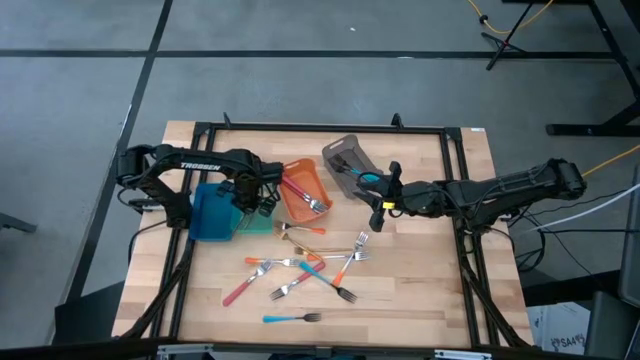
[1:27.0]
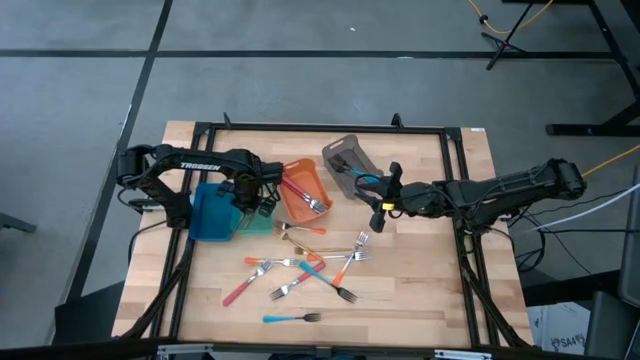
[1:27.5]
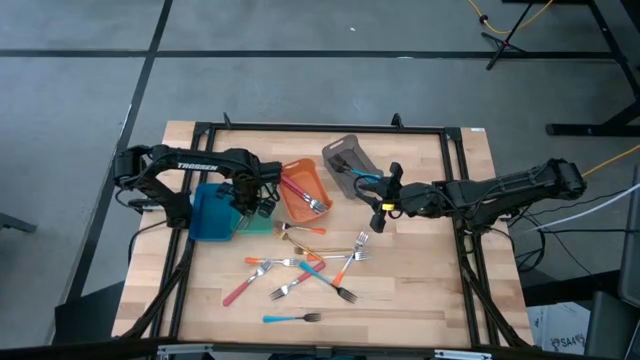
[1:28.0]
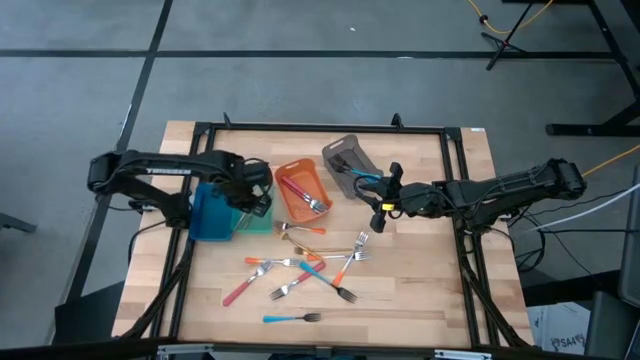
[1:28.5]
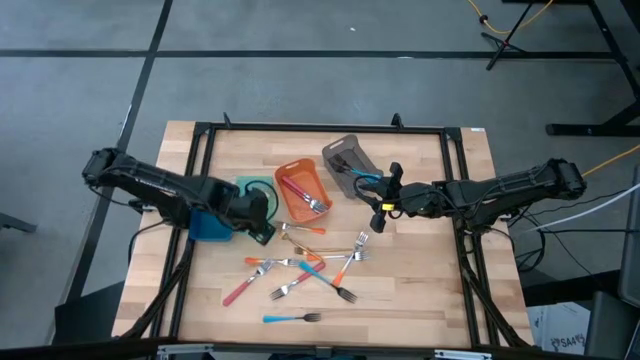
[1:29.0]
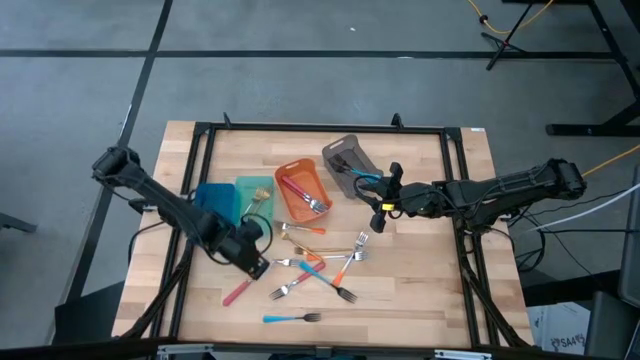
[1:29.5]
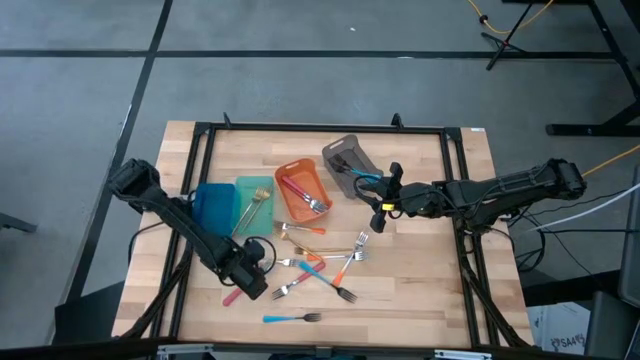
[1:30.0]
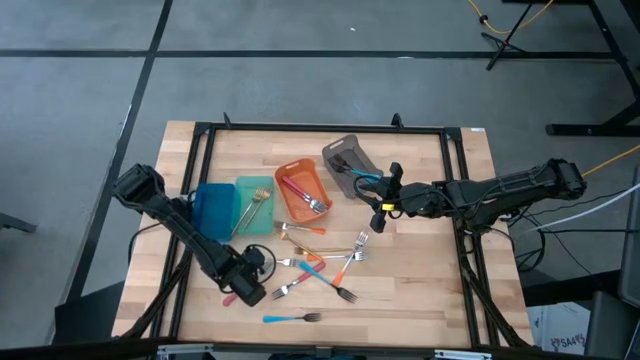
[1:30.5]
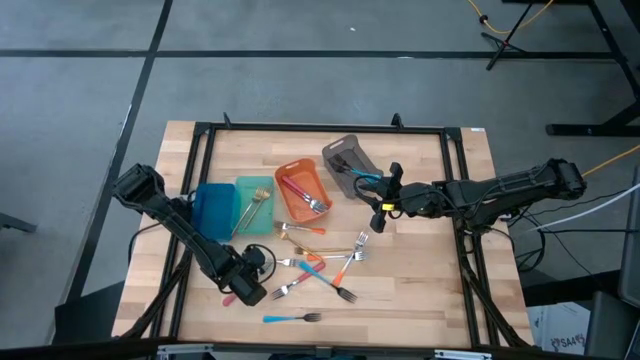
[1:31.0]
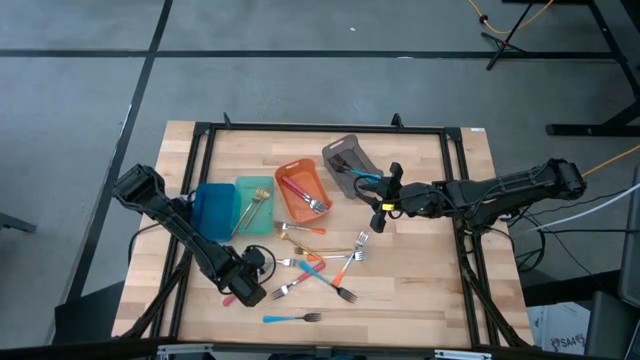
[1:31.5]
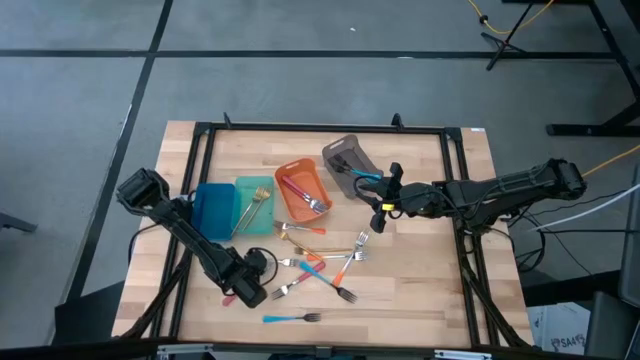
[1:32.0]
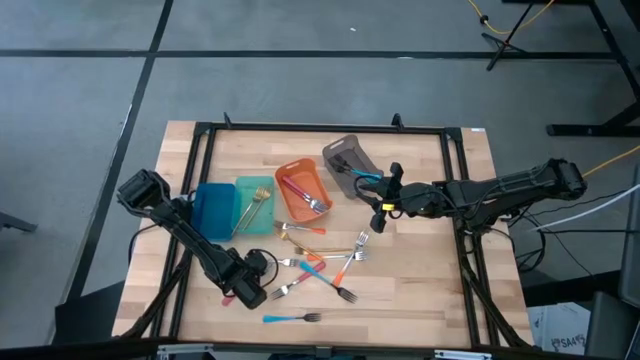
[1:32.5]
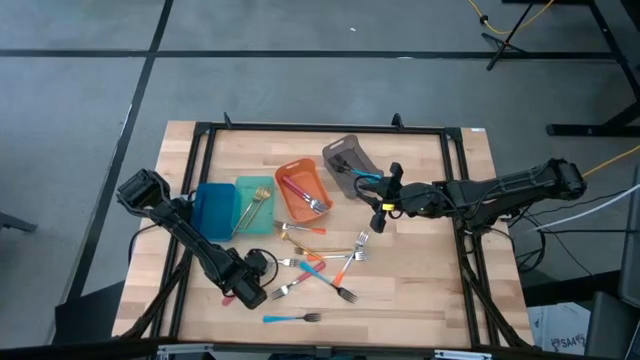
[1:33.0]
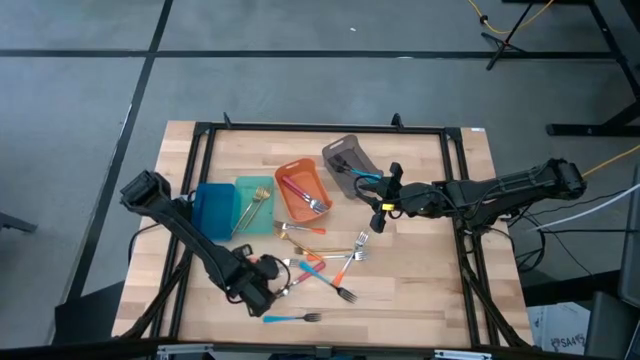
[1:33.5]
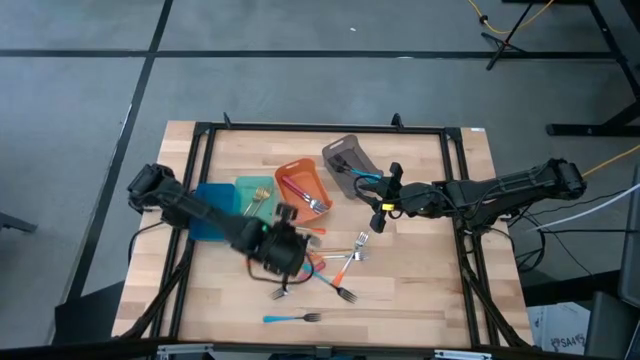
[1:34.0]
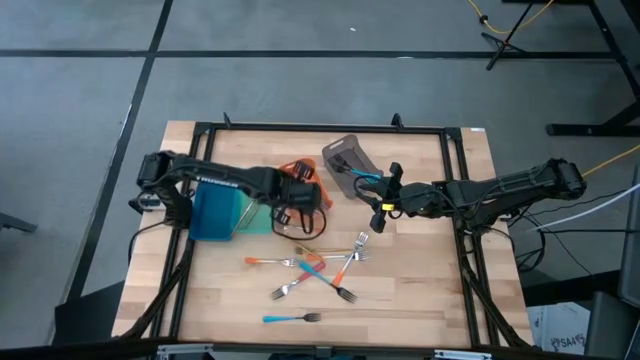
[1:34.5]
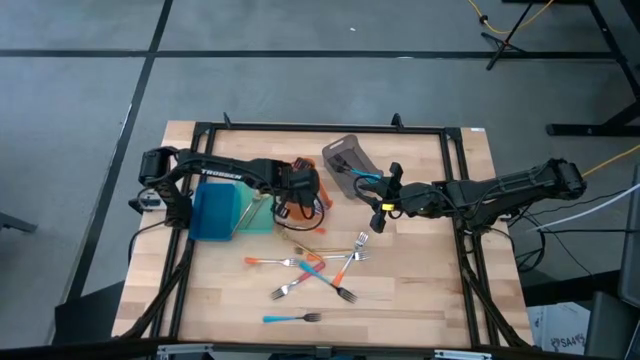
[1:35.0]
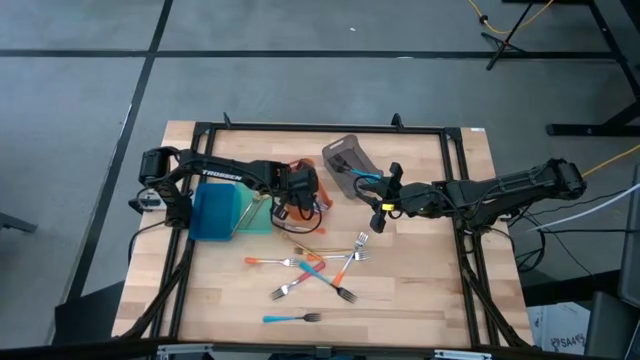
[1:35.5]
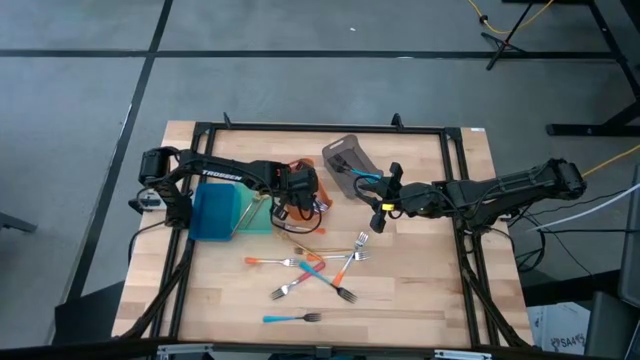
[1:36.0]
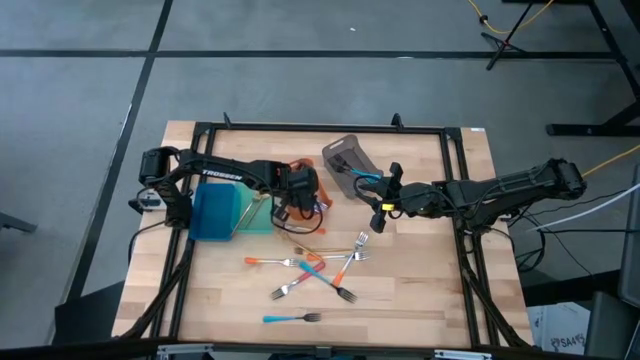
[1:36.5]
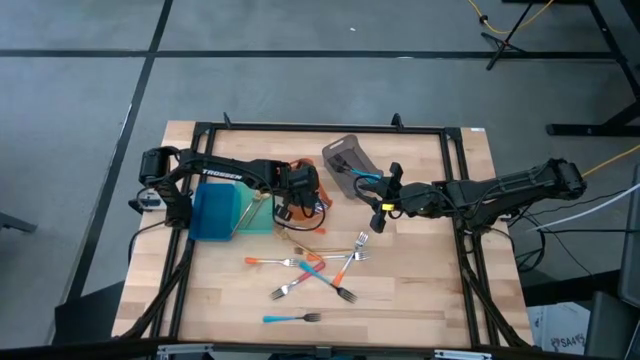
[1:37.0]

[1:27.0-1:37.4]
Task: Sort silverware by color (type)
Put the pink fork into the orange bin

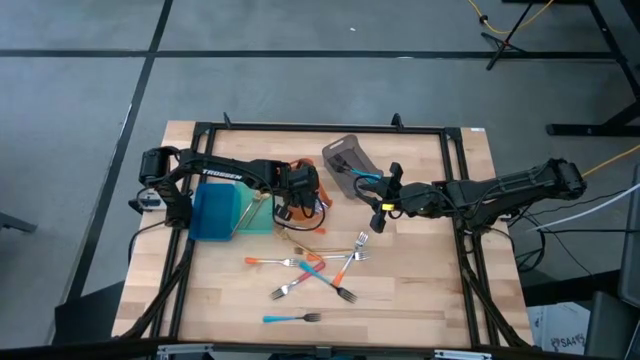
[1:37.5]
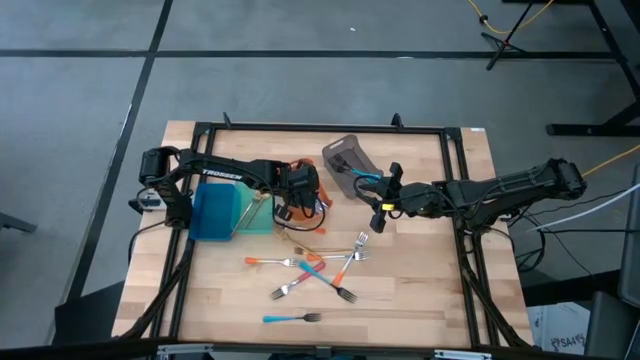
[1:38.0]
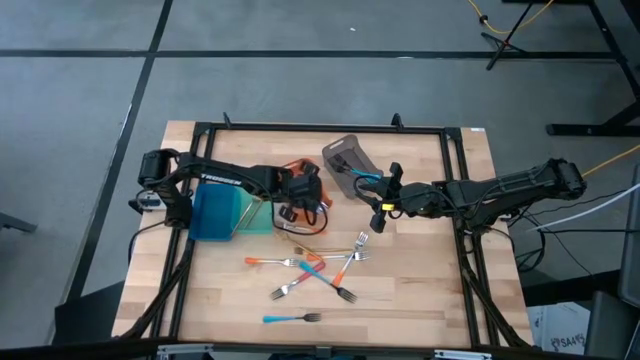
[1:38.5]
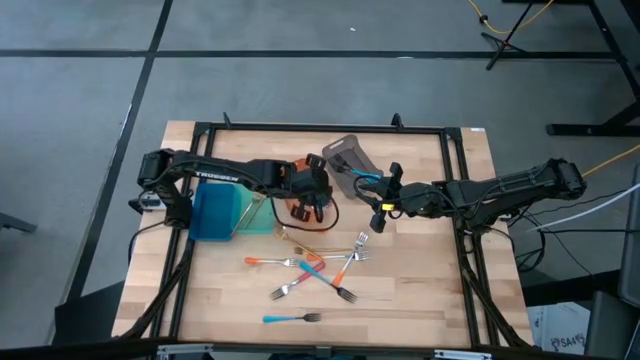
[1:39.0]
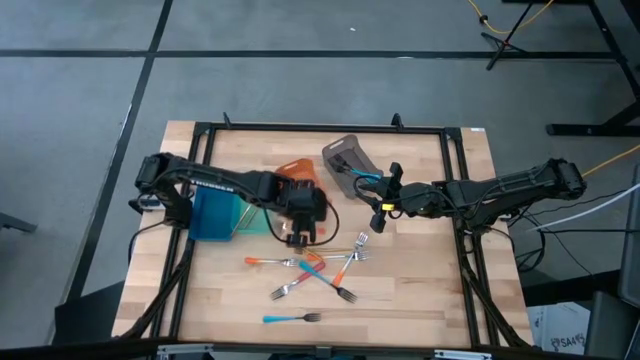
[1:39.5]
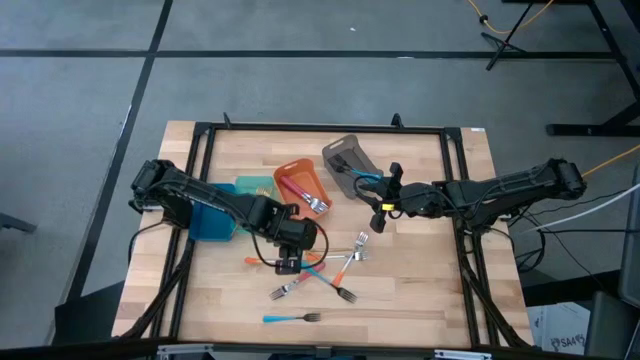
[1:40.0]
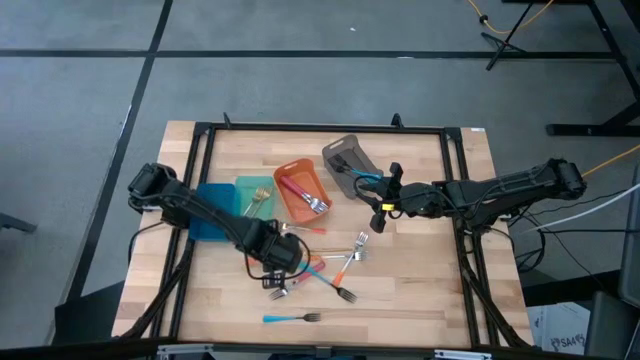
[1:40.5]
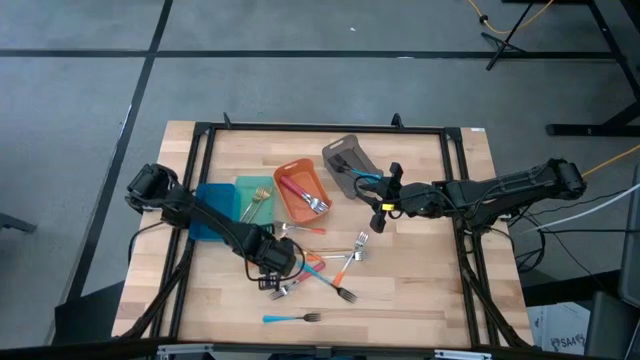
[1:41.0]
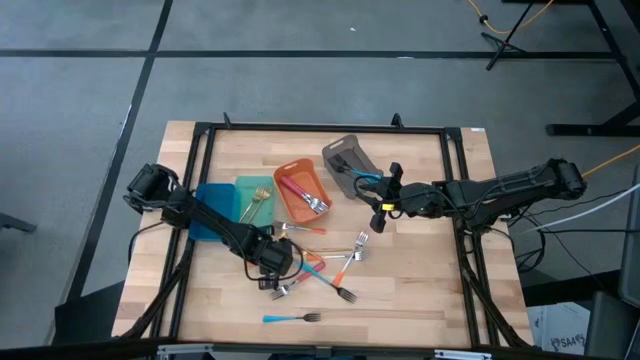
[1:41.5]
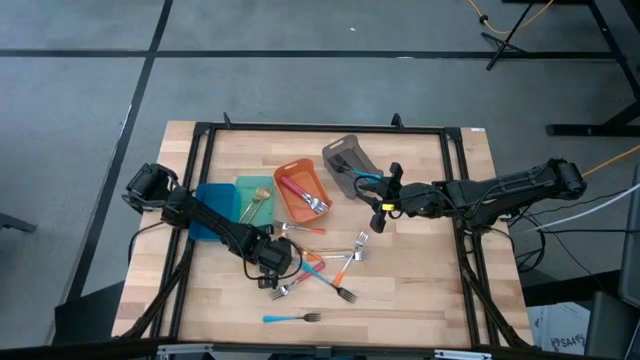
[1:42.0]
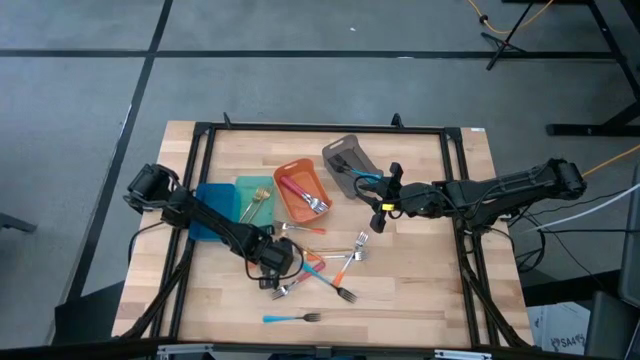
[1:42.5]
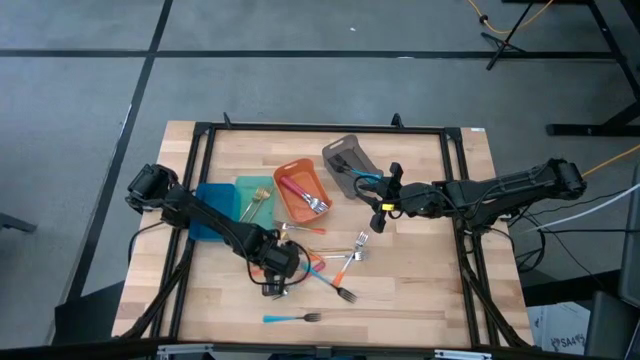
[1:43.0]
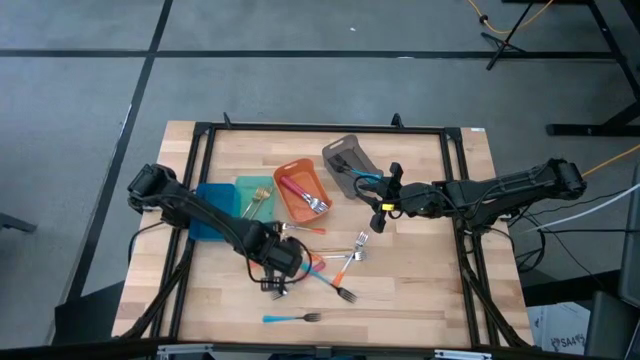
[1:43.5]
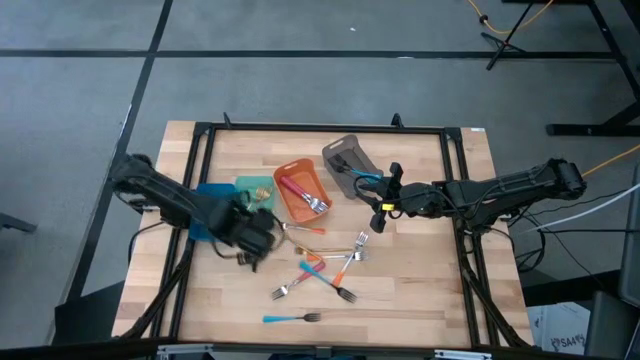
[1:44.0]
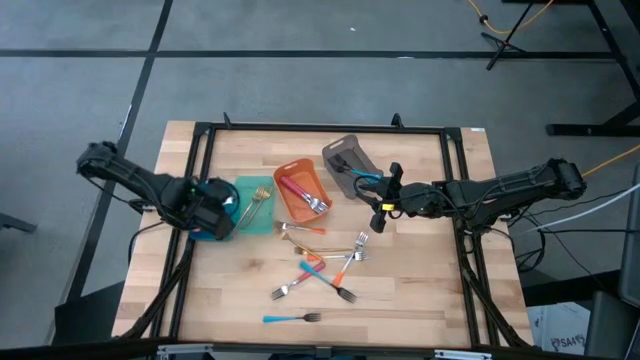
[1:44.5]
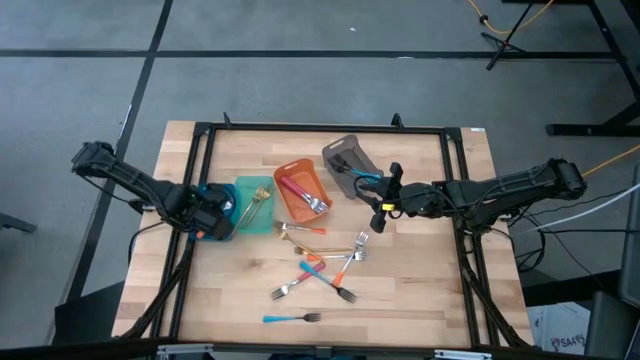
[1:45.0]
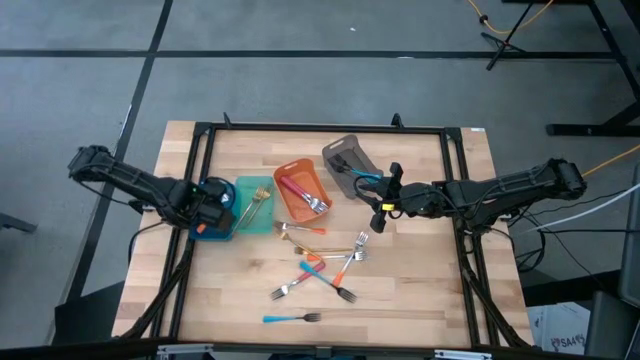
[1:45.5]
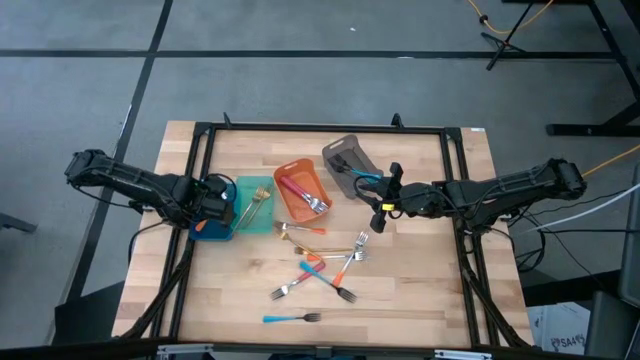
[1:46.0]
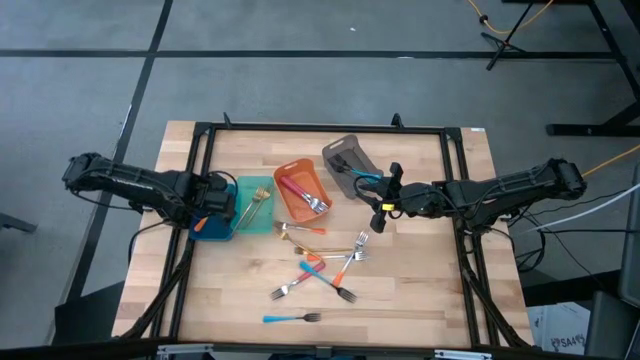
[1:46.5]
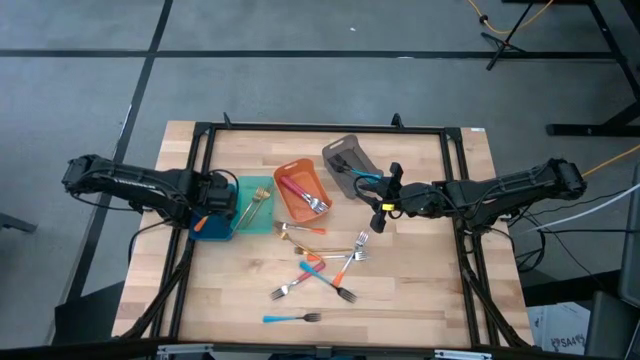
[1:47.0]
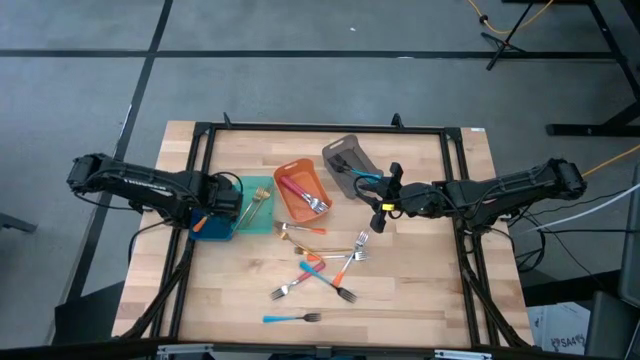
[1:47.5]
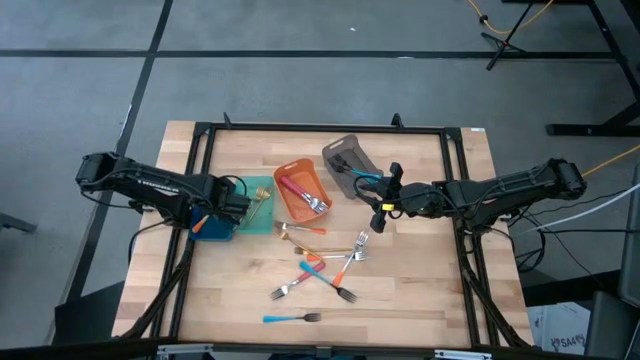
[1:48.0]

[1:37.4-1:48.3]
Put the orange fork into the blue bin
